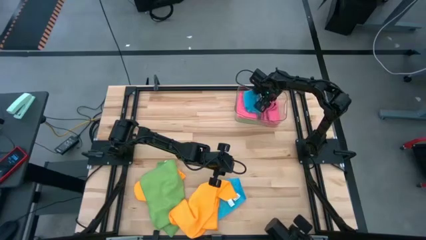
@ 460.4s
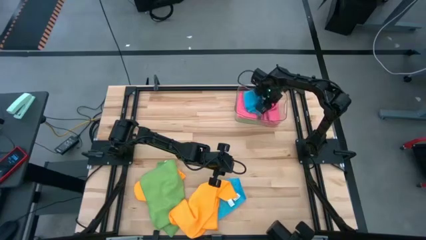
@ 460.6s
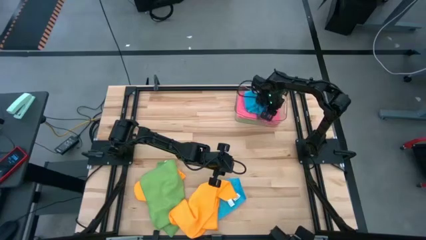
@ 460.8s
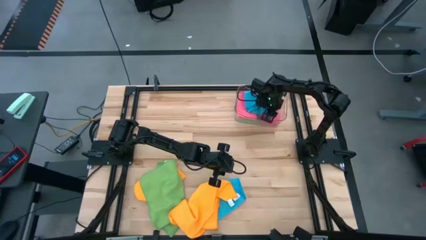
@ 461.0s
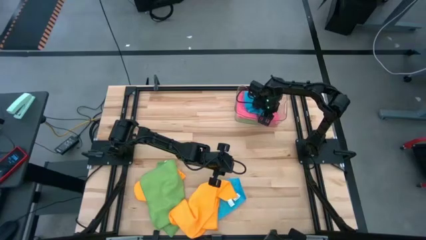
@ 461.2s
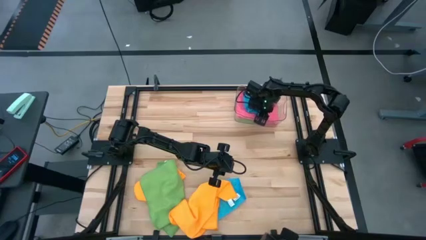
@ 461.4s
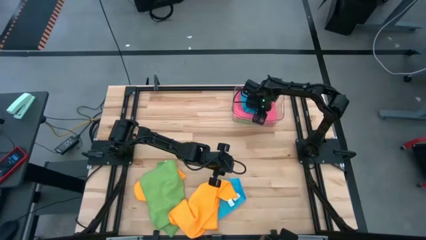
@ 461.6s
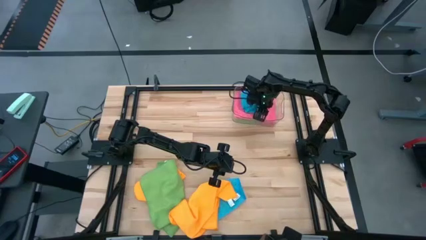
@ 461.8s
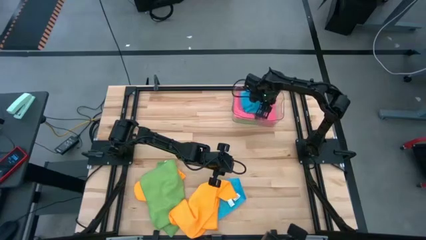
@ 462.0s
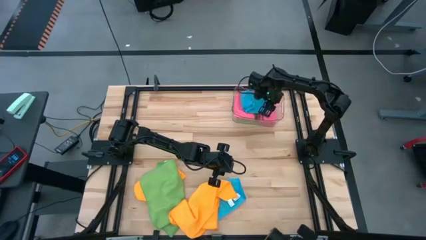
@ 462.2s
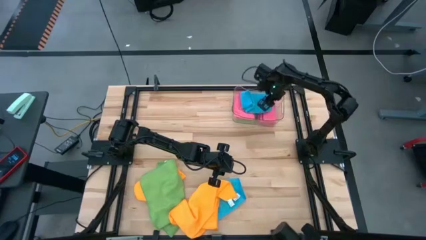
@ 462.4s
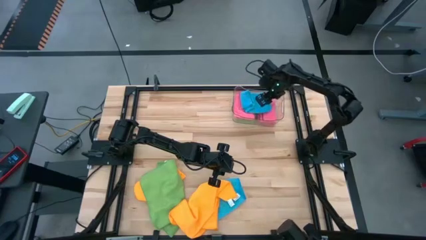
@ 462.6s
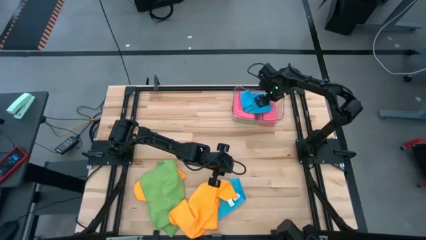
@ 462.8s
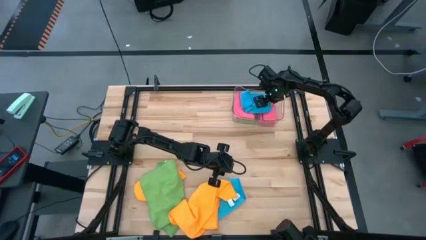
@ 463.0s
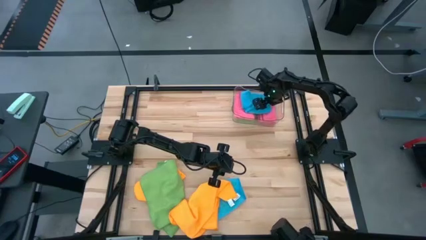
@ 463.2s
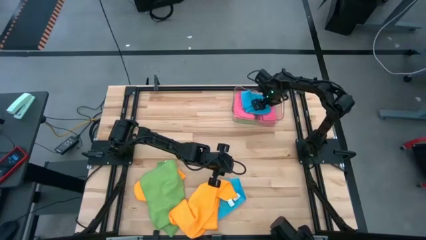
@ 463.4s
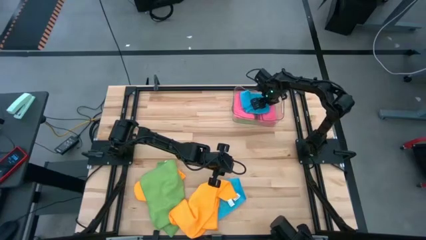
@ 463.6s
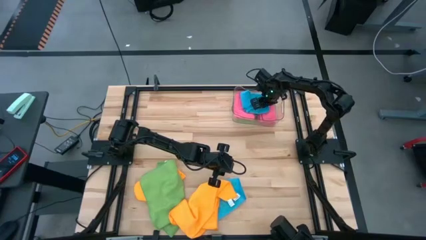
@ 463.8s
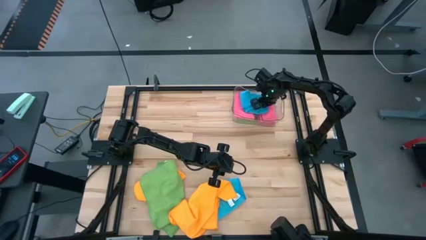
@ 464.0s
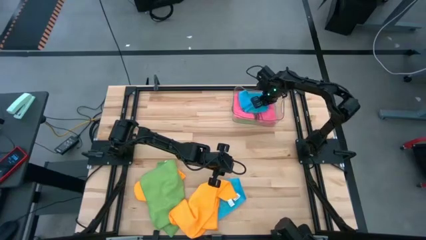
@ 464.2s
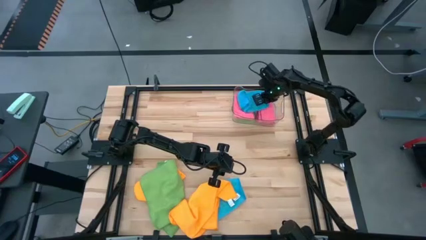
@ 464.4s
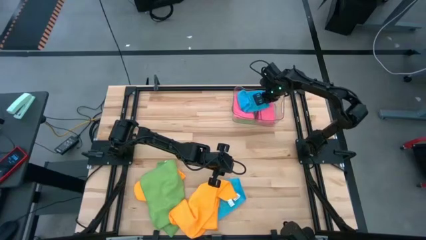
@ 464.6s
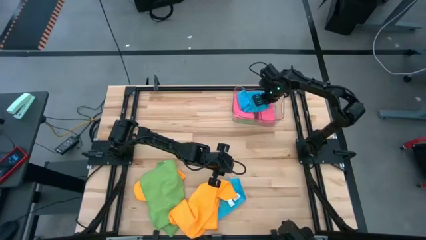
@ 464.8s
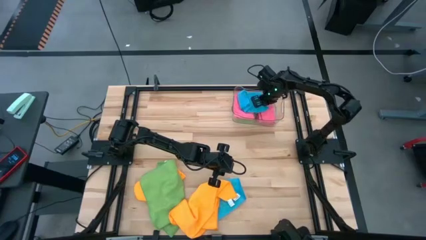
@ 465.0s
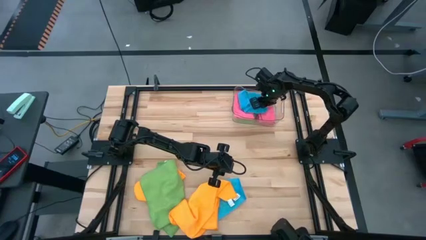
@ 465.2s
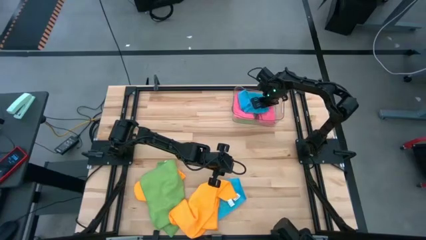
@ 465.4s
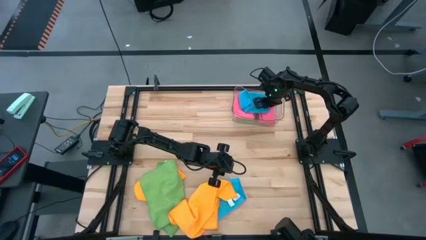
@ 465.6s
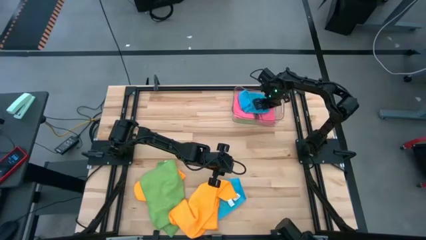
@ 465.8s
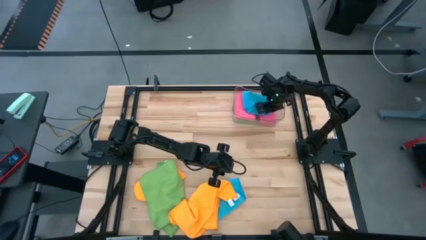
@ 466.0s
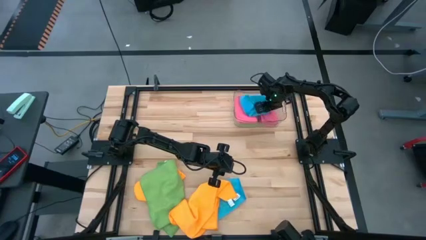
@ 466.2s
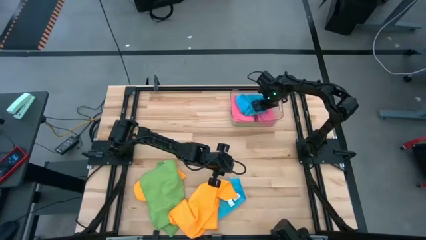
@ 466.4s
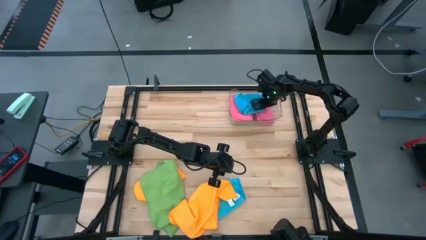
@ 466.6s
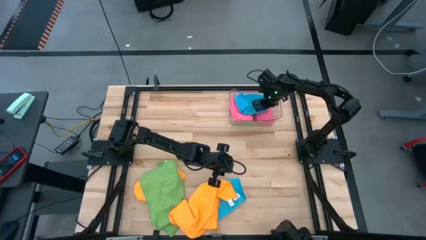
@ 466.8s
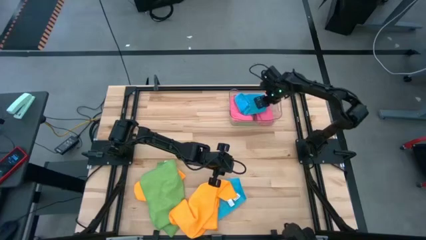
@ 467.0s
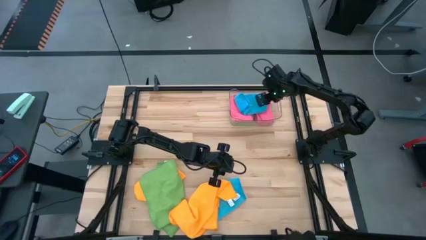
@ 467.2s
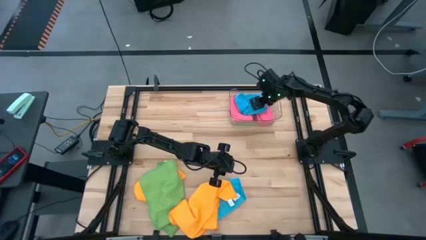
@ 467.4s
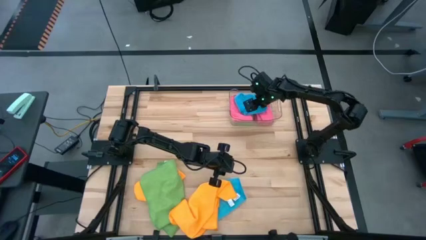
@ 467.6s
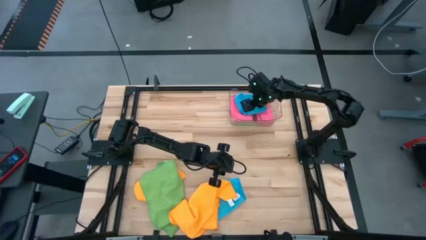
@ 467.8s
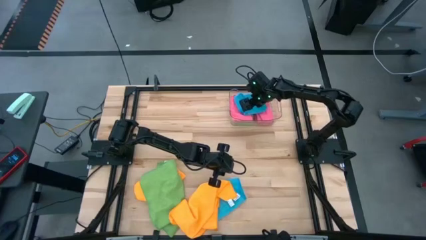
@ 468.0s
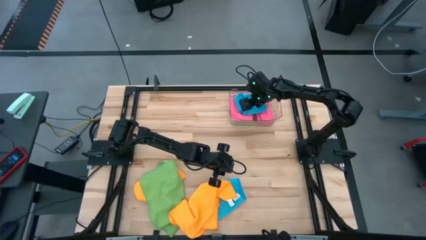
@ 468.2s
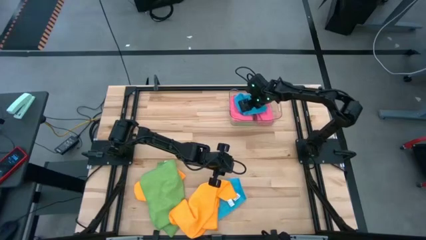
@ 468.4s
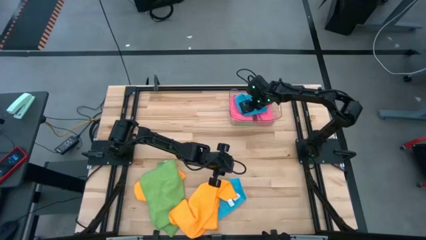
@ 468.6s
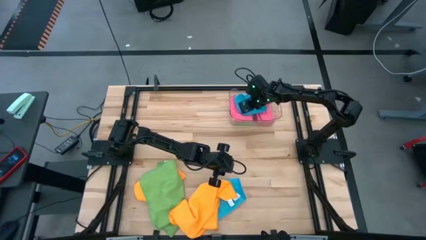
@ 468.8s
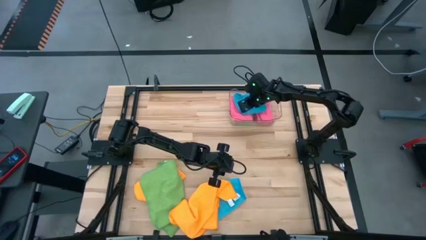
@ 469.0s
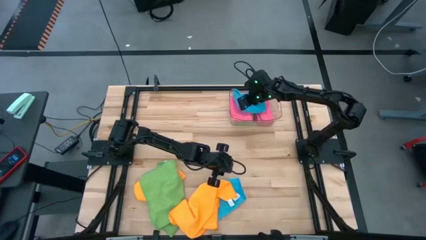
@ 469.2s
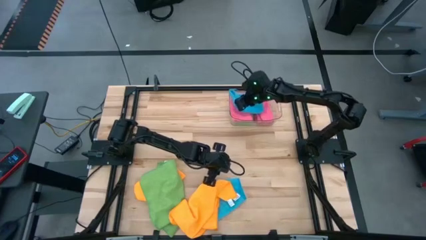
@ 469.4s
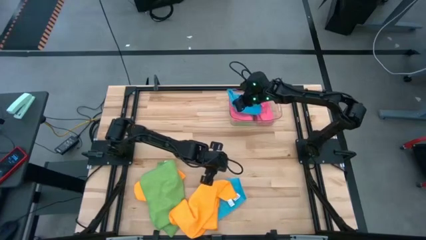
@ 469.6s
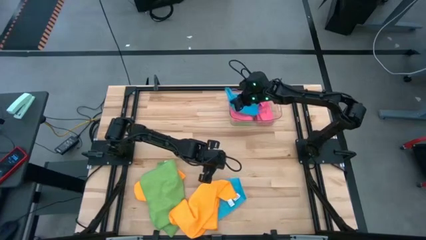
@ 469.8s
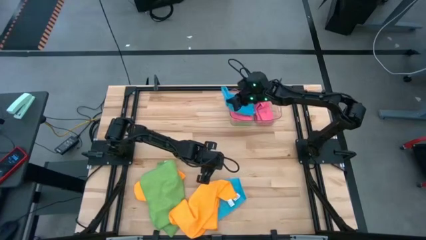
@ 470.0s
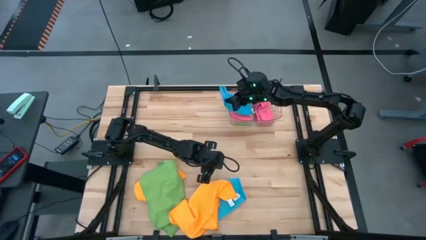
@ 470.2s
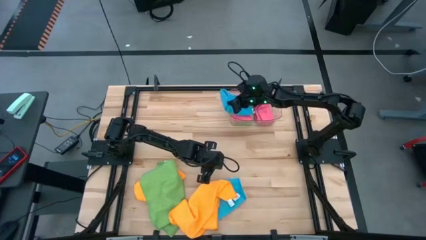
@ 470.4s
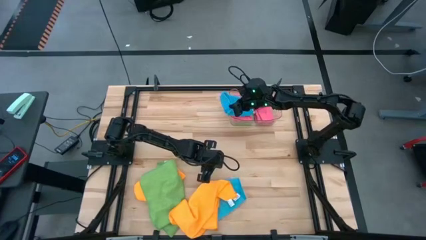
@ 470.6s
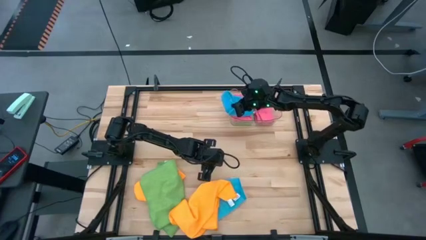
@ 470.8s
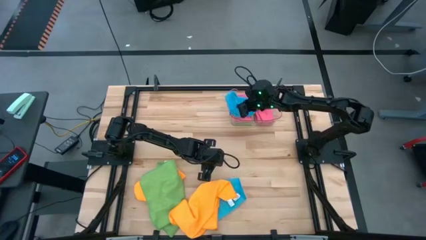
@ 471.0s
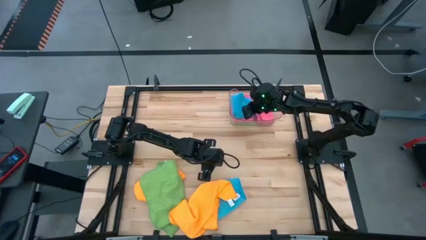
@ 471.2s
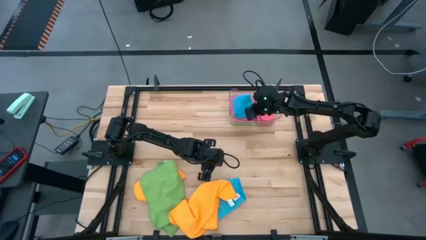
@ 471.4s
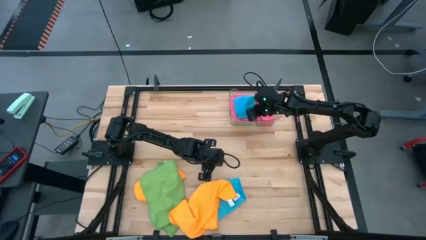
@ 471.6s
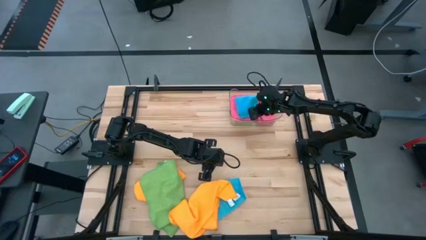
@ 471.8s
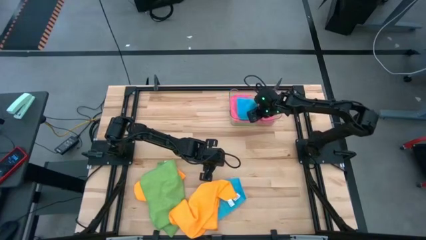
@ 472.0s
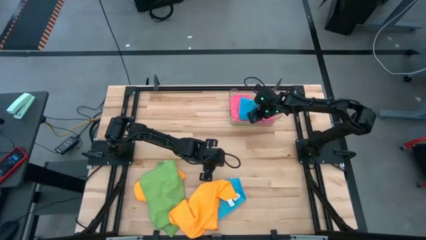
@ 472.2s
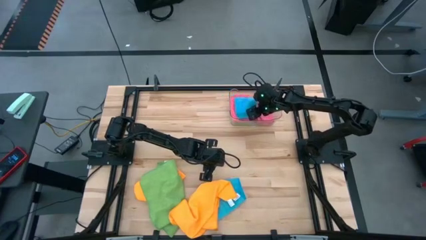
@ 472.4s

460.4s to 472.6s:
Task: Fold microfiber towels
Adjust the blue towel in the bin

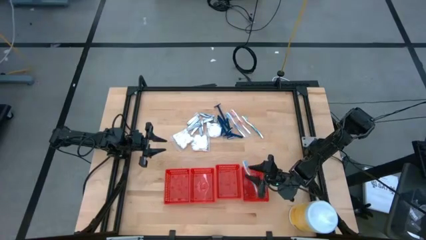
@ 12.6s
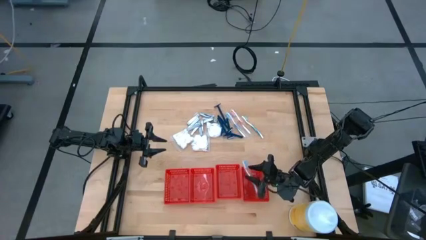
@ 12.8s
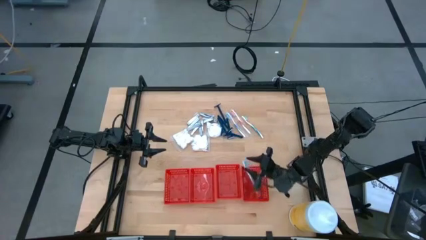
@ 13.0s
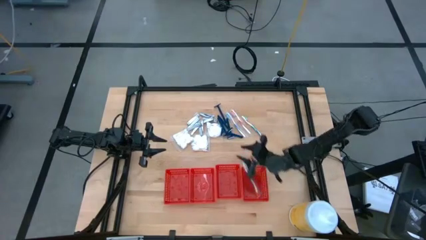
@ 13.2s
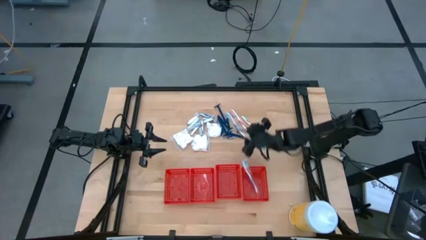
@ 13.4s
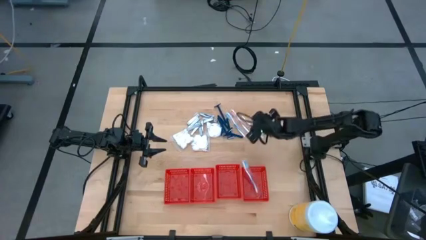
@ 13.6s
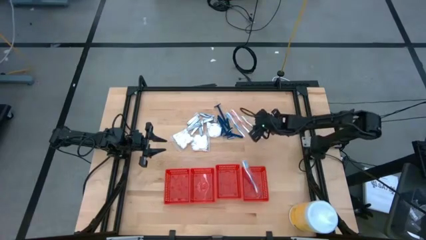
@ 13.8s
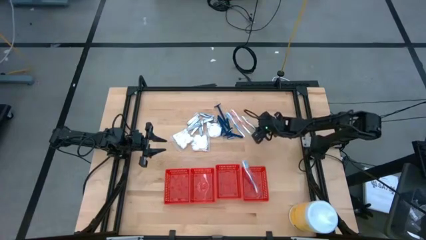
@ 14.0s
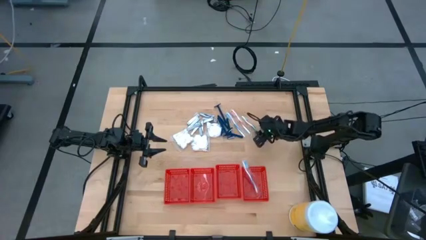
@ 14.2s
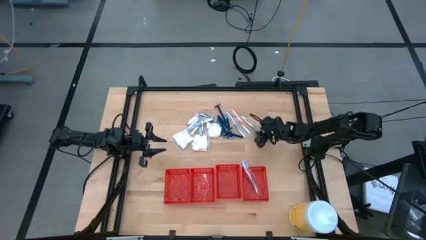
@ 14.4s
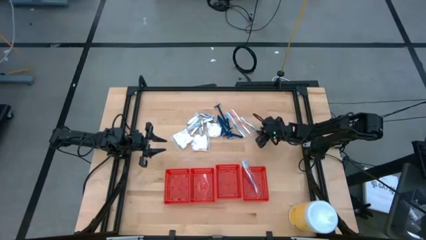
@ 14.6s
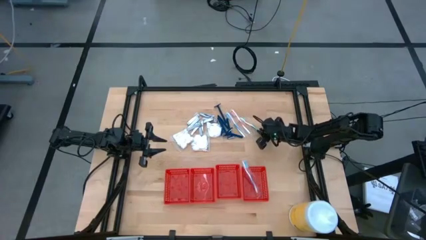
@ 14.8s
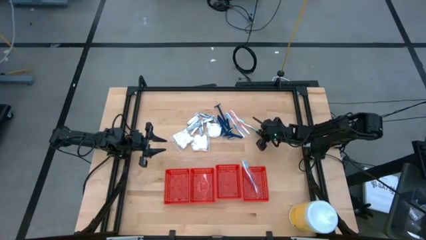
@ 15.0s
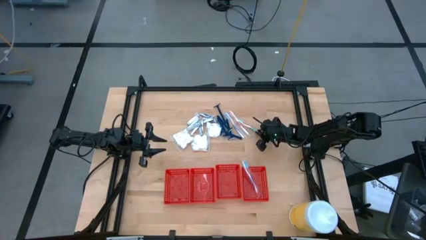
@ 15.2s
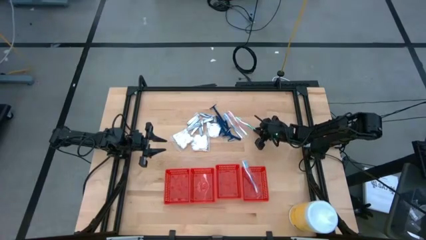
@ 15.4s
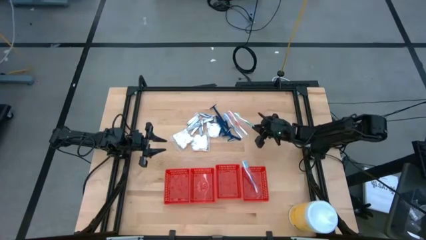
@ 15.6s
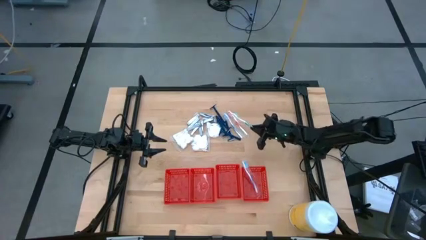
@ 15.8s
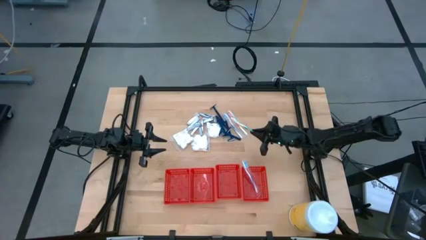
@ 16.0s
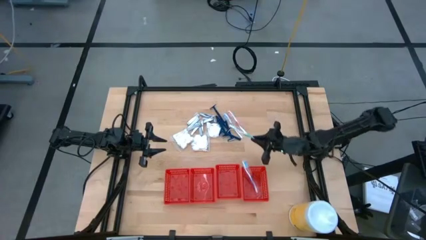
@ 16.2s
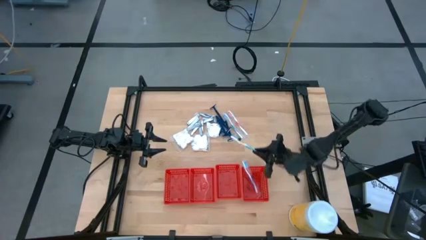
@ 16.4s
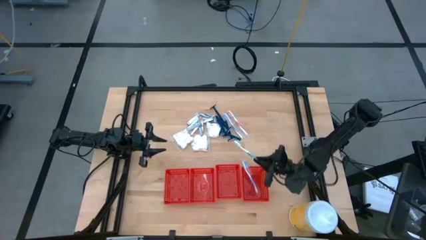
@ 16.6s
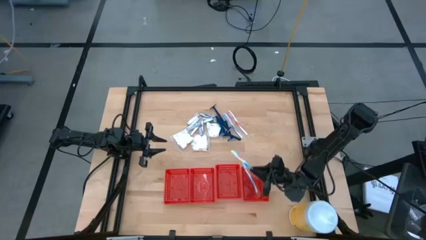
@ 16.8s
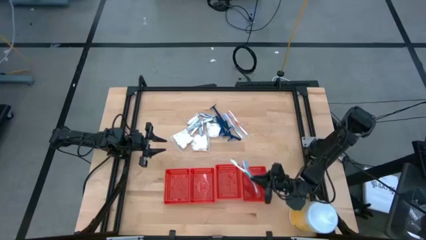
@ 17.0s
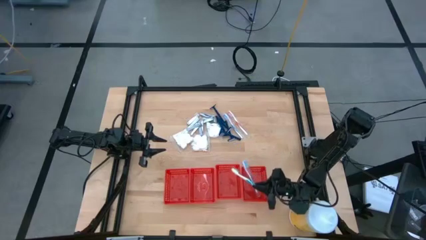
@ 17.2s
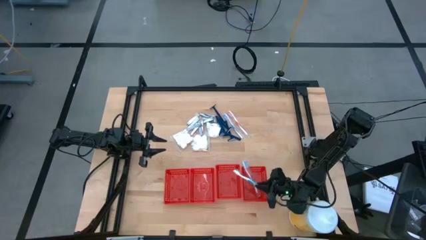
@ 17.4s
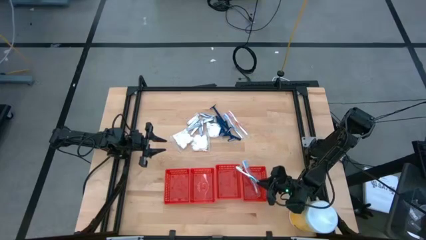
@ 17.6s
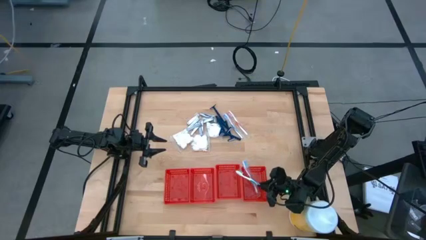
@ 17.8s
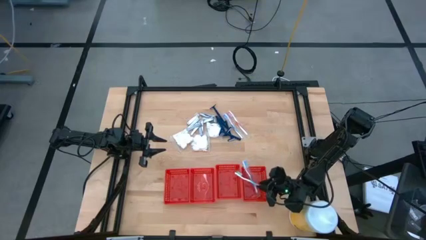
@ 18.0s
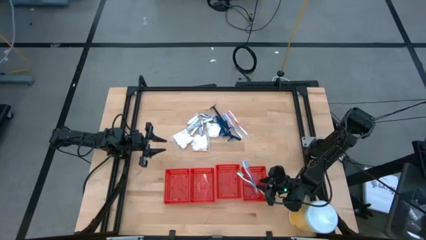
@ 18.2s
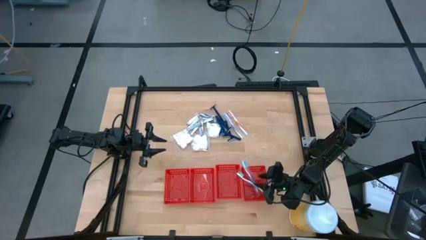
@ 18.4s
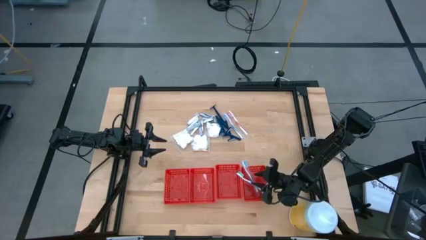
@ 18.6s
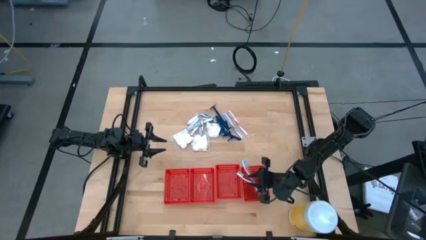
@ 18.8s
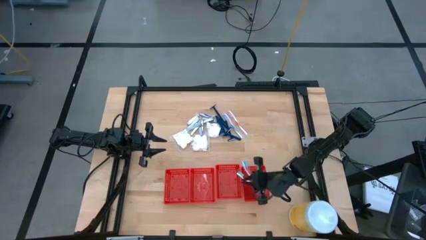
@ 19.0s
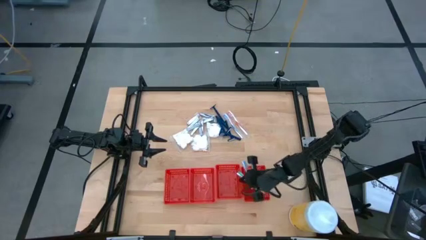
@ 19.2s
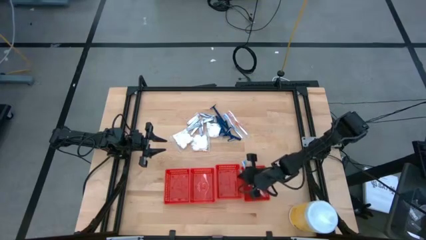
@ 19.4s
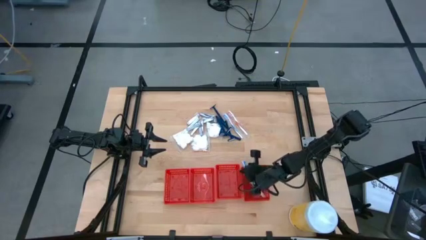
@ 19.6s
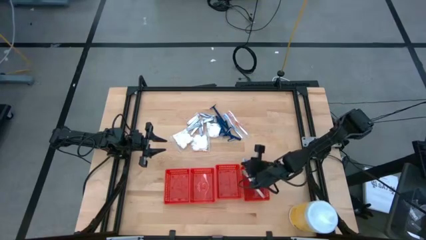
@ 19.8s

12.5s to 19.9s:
Task: Pick & Place Travel size toiletries
Put the blue toothbrush into the right red bin
